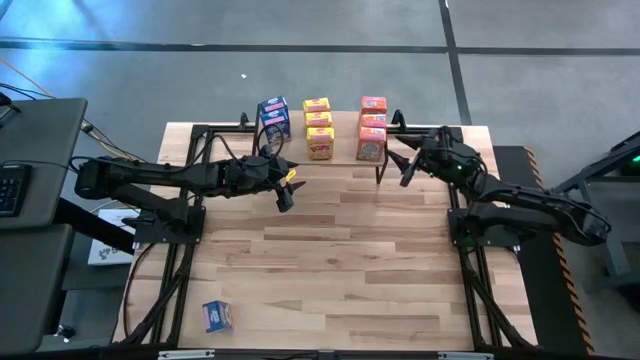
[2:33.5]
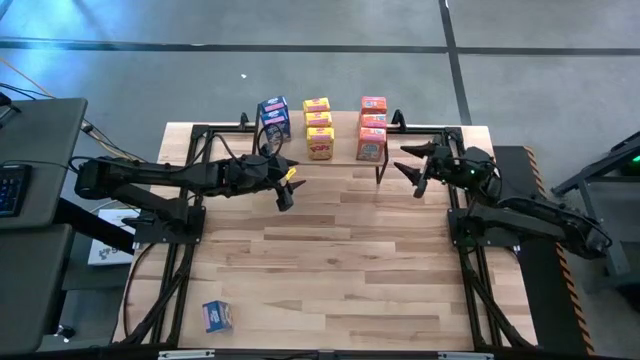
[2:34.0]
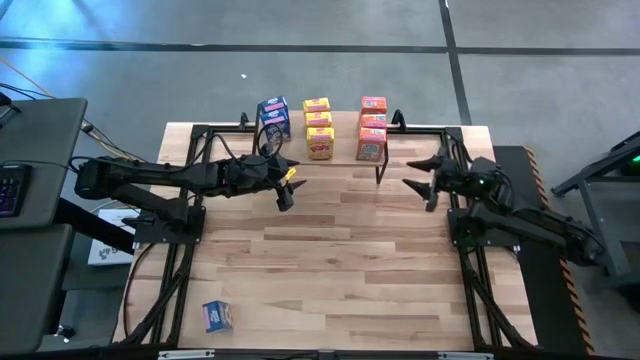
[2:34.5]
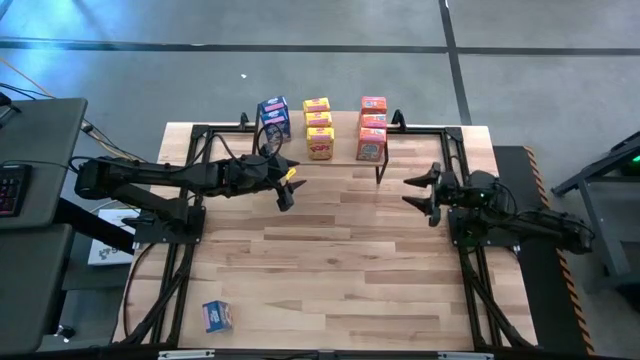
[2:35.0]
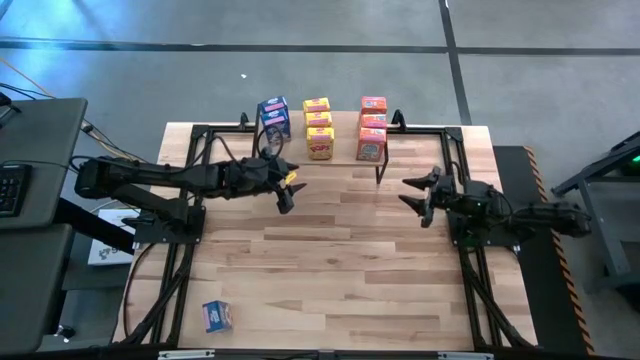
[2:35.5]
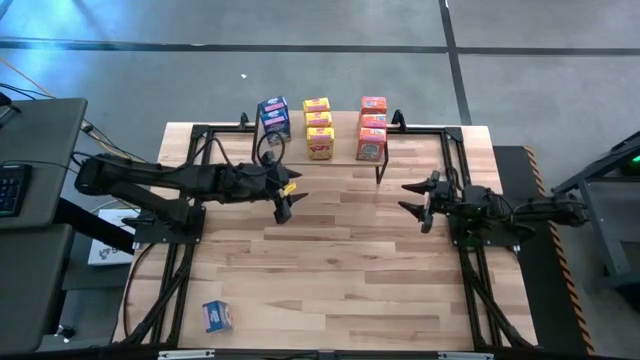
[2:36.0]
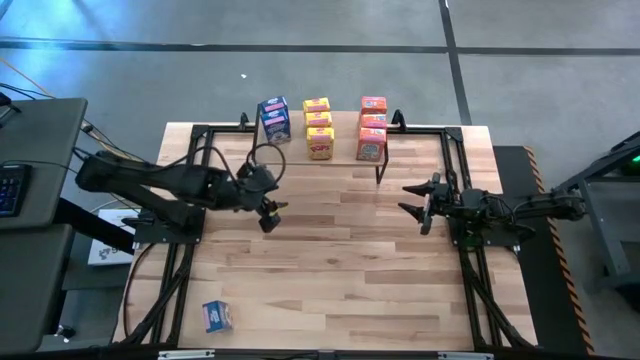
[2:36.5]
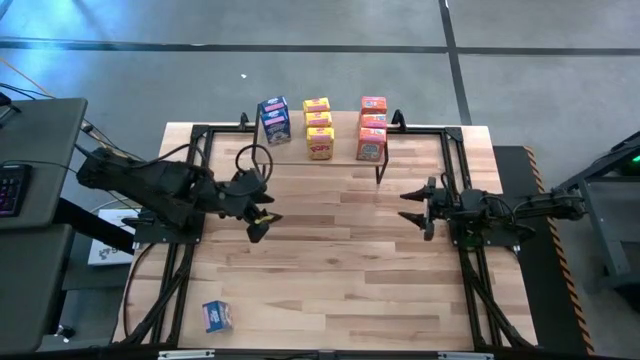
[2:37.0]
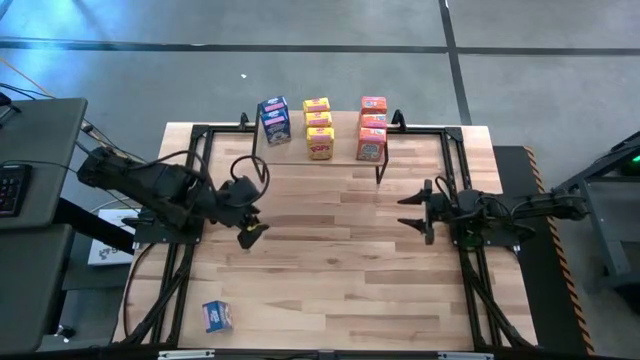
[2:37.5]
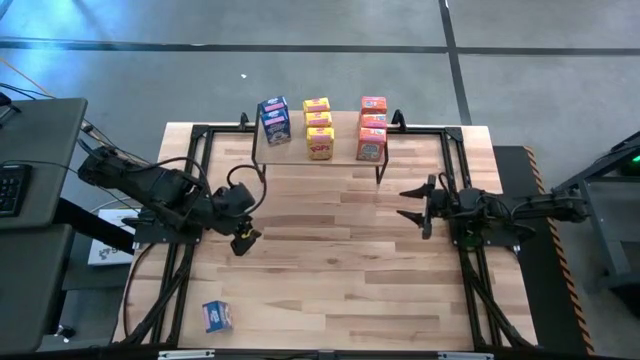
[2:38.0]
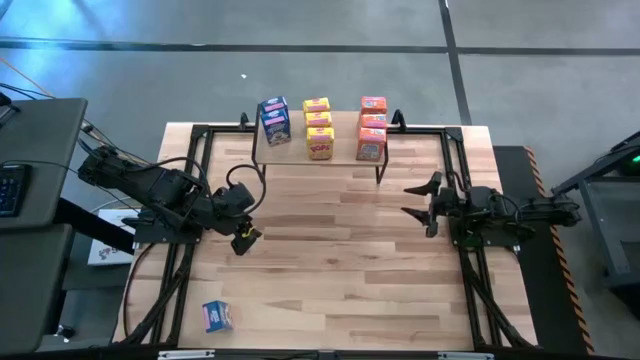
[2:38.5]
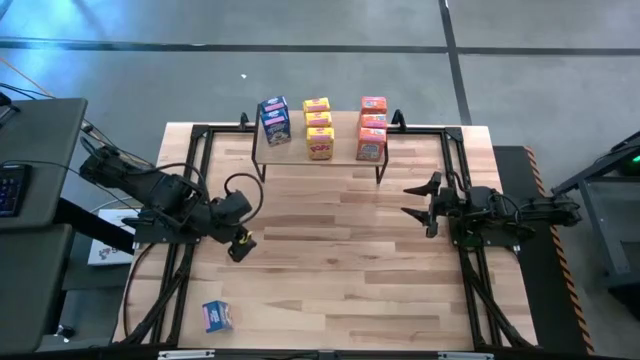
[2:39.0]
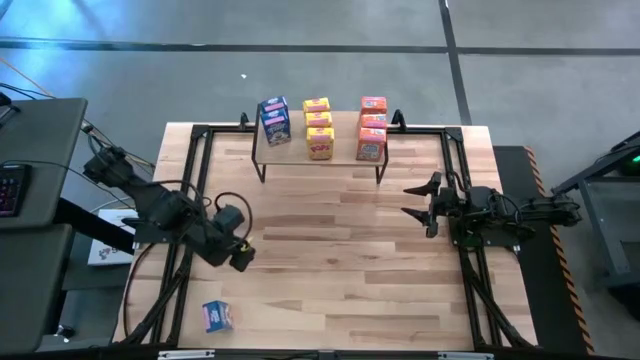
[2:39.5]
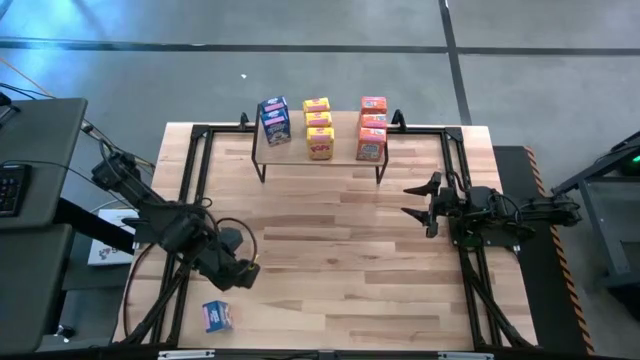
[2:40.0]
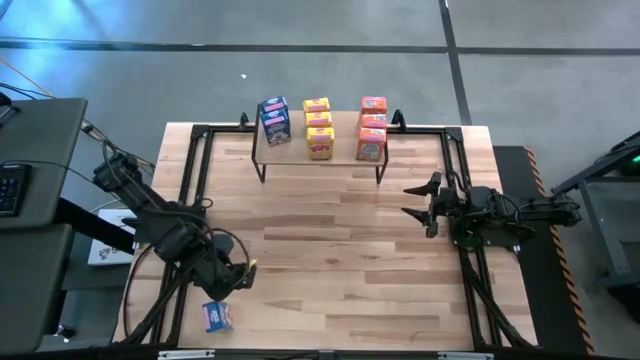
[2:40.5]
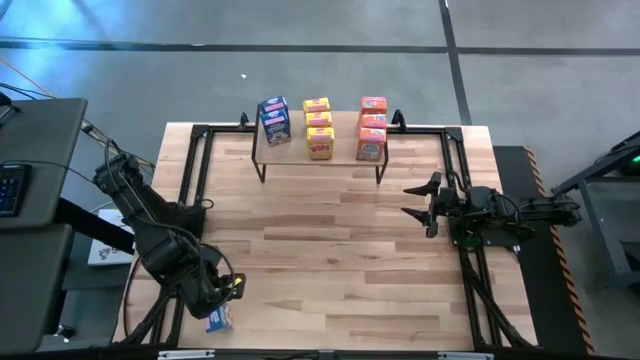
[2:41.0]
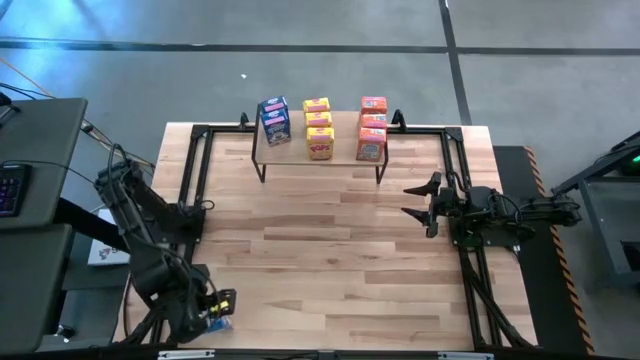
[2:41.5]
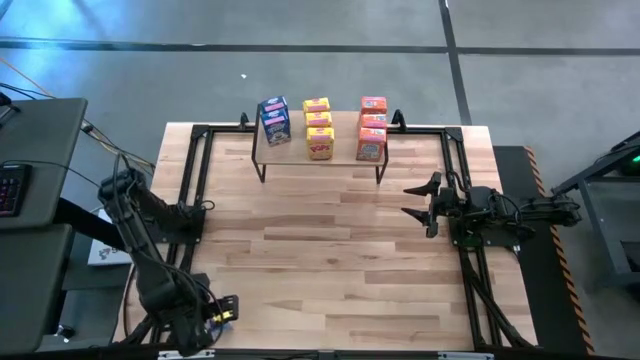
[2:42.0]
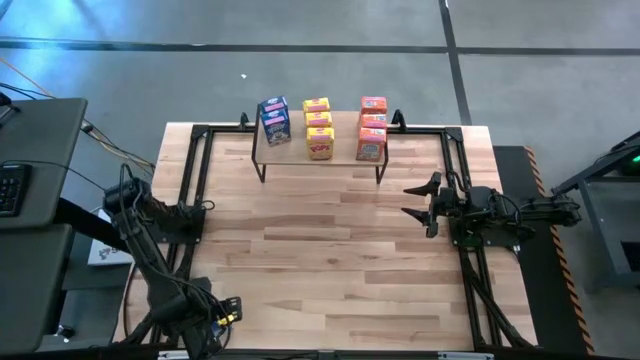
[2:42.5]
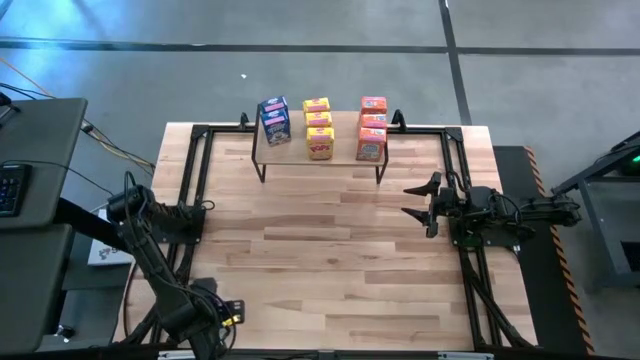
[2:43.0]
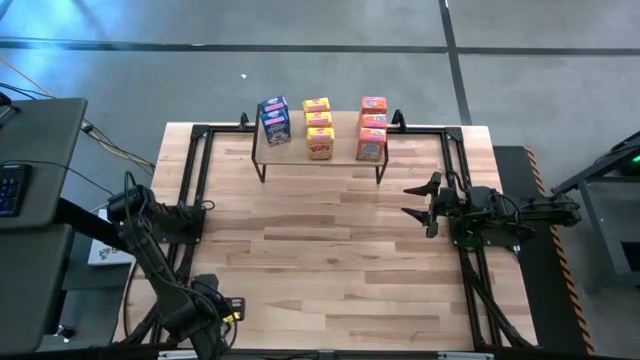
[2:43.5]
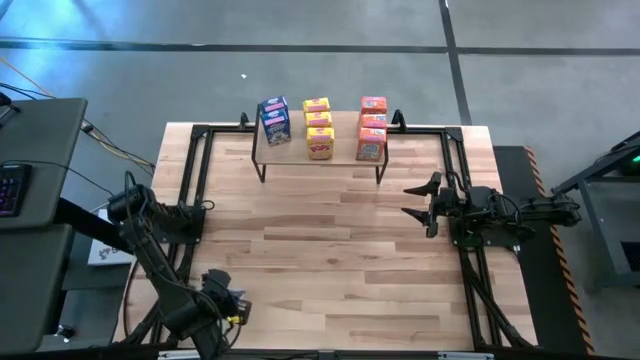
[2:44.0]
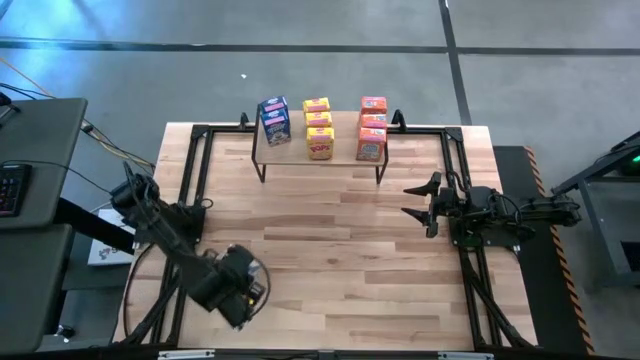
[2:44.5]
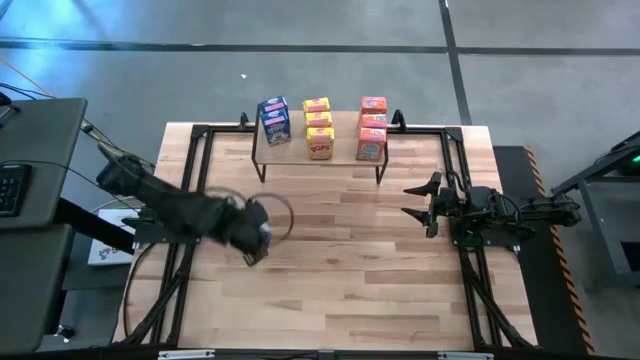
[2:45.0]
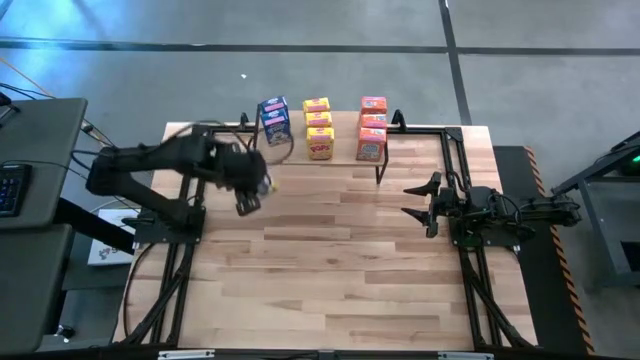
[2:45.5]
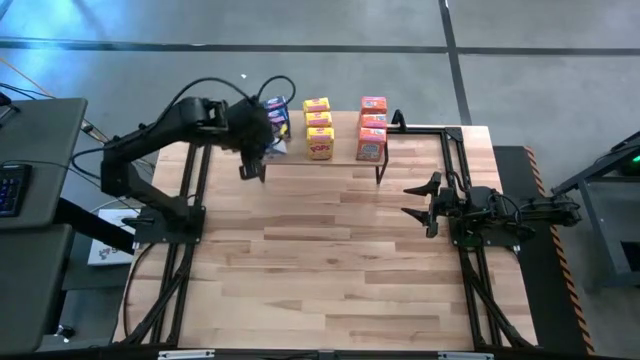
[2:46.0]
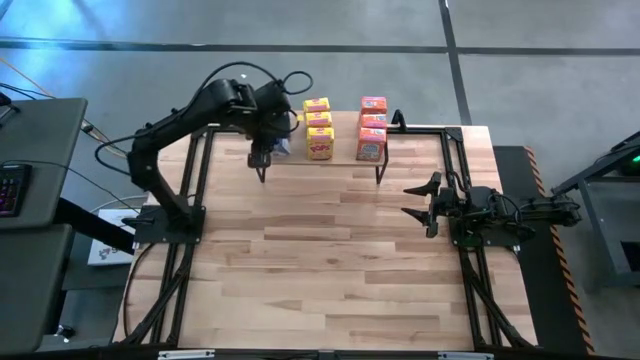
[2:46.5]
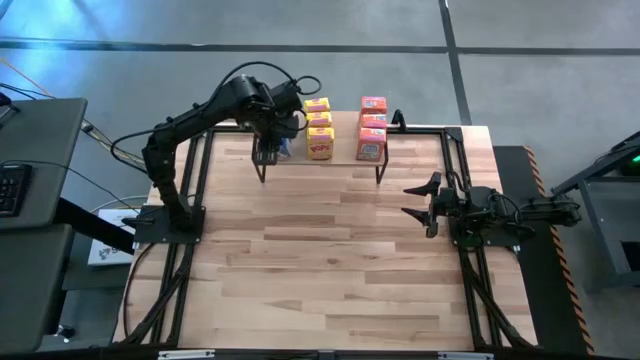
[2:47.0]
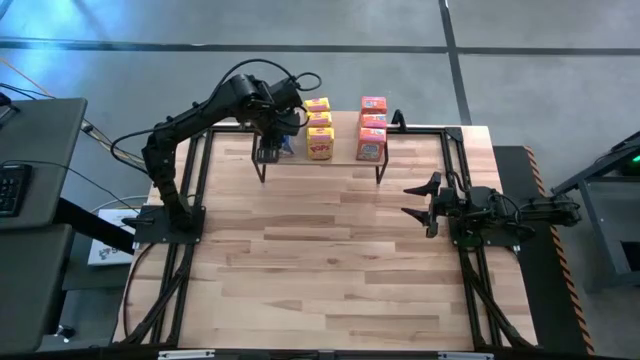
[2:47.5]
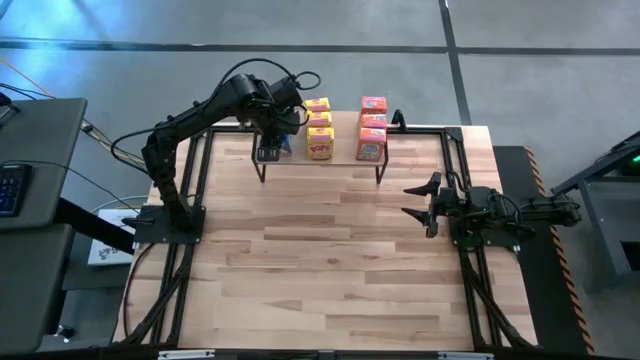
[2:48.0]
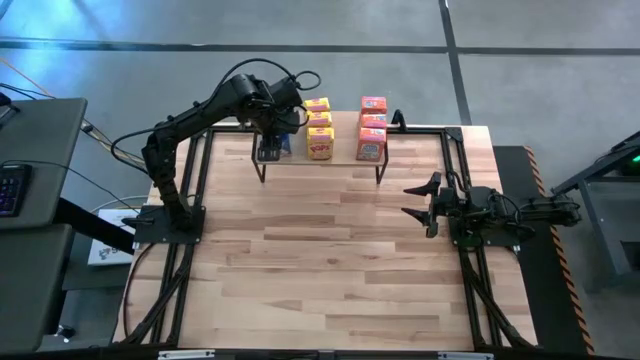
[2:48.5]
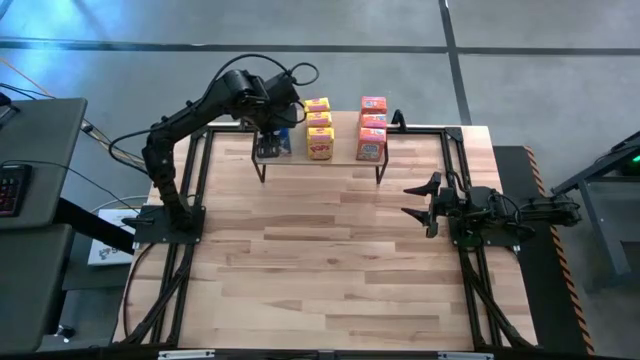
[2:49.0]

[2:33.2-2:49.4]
Task: Stack cereal on shelf
Put the blue cereal box and aligned with the other blue cereal boxes on the shelf

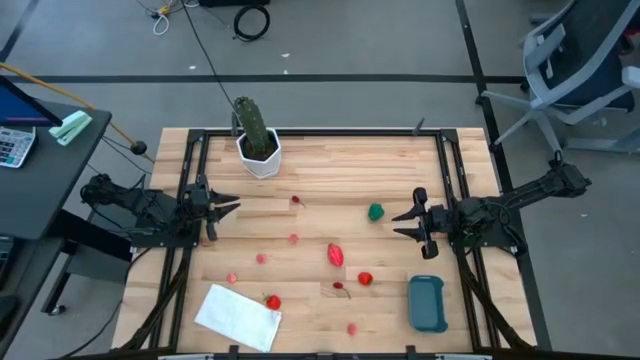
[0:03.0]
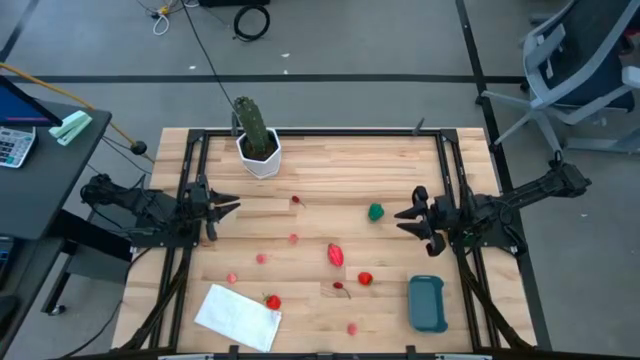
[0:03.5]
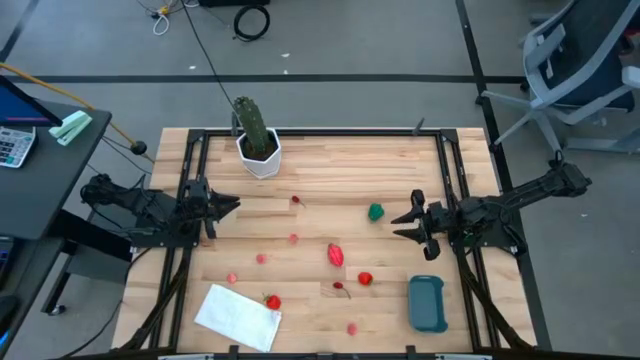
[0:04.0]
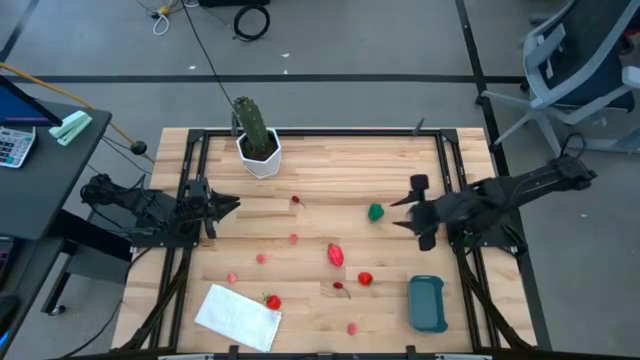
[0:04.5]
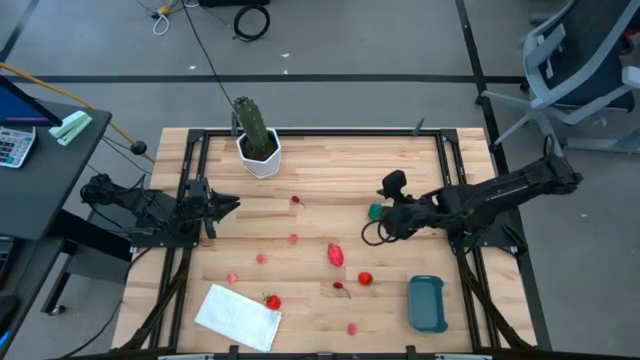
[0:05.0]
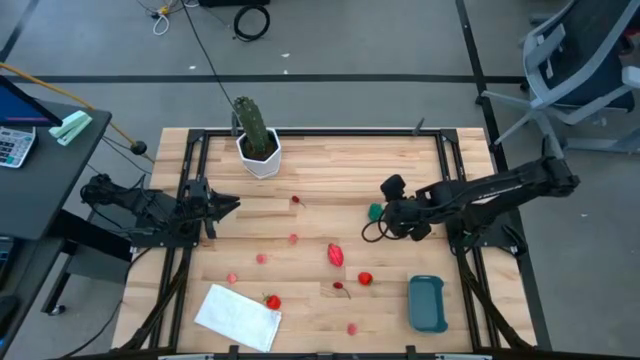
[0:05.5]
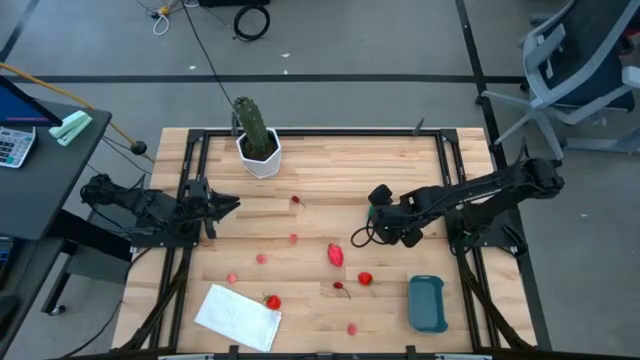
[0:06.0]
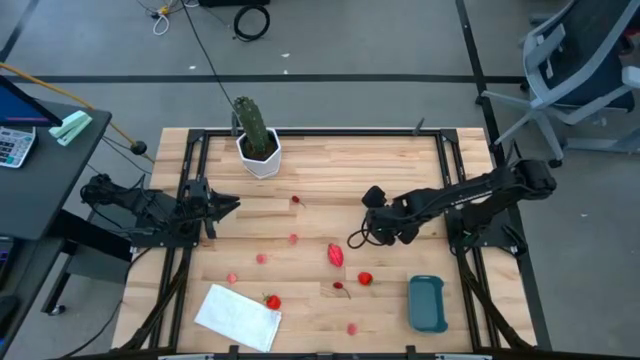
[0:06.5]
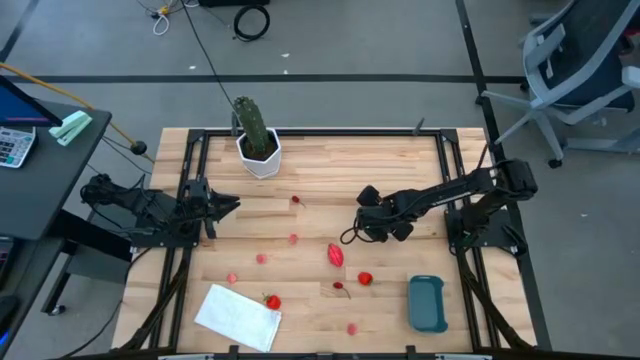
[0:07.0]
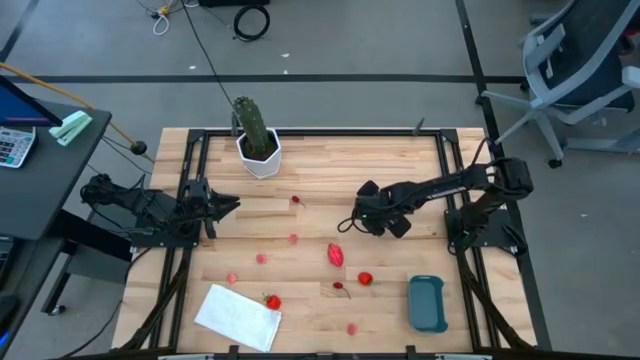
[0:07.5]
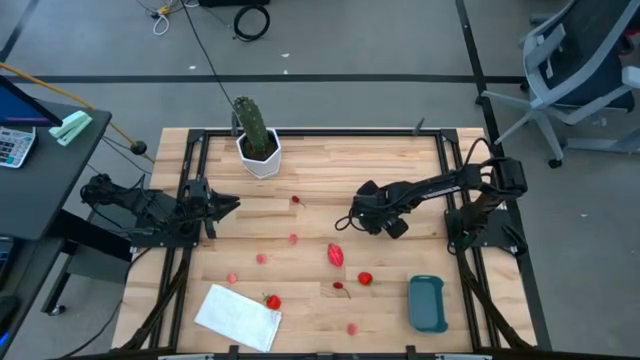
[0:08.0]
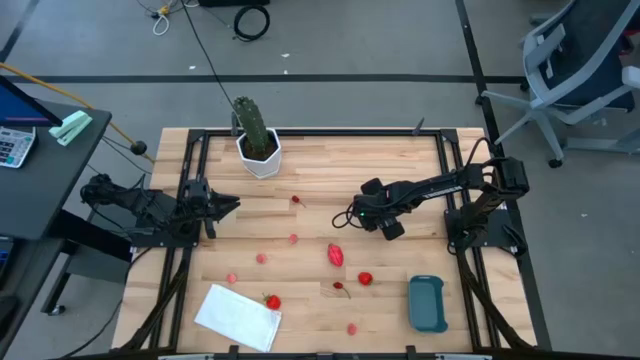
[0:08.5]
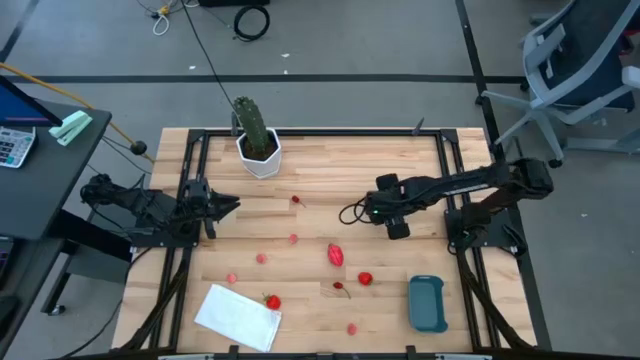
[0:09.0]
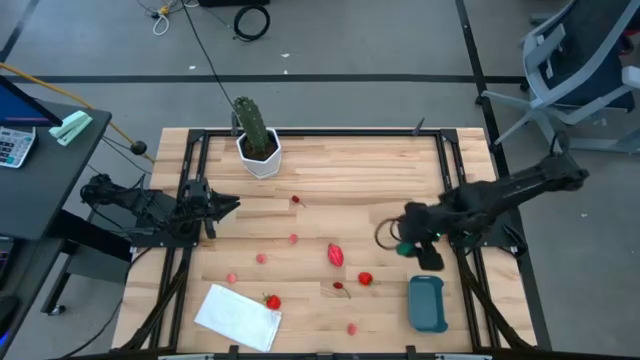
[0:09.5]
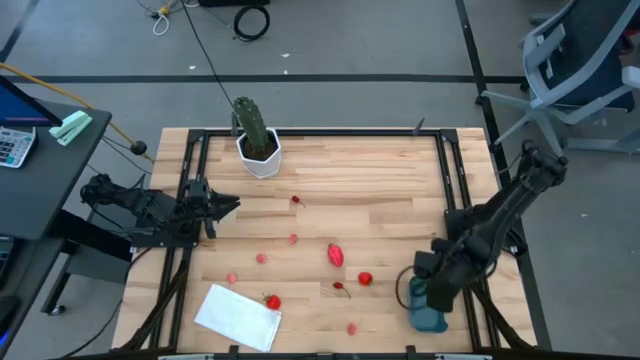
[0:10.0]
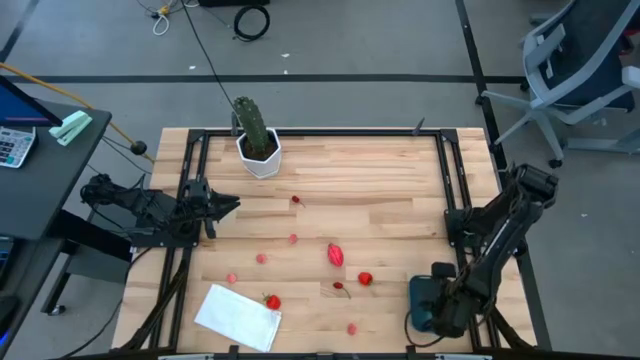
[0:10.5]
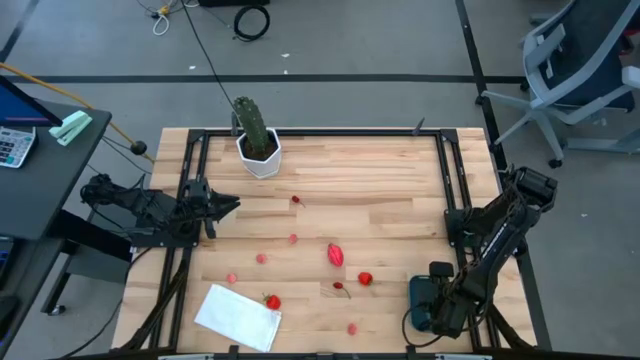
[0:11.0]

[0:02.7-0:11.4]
Task: Pick and placing Produce into tupperware
Put the green bell pepper into the bin
